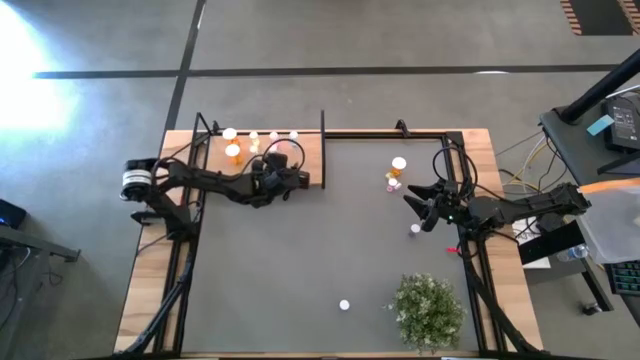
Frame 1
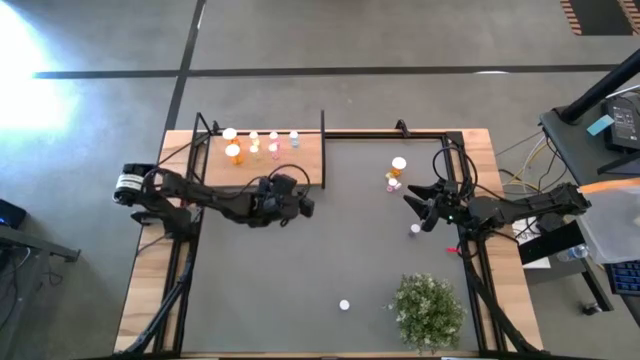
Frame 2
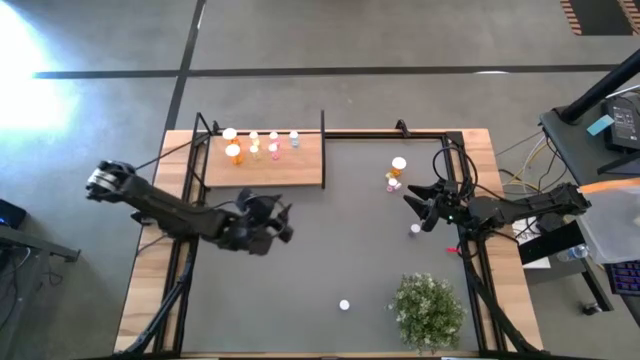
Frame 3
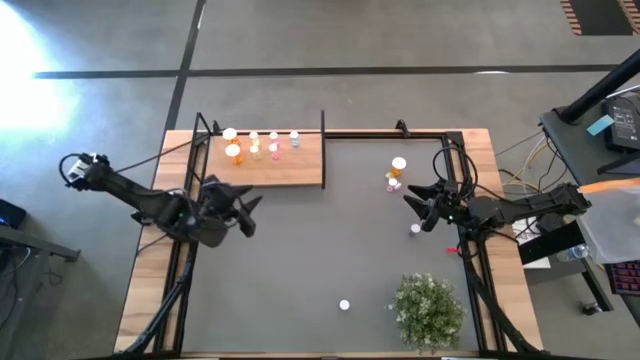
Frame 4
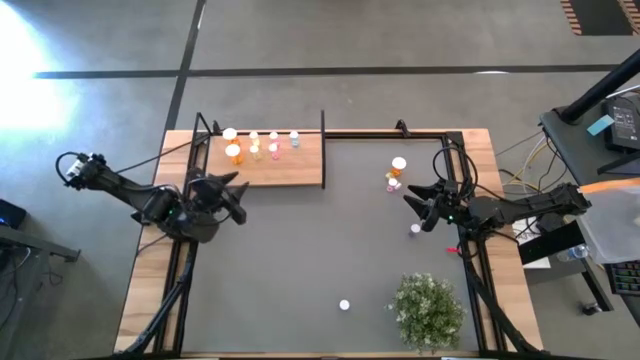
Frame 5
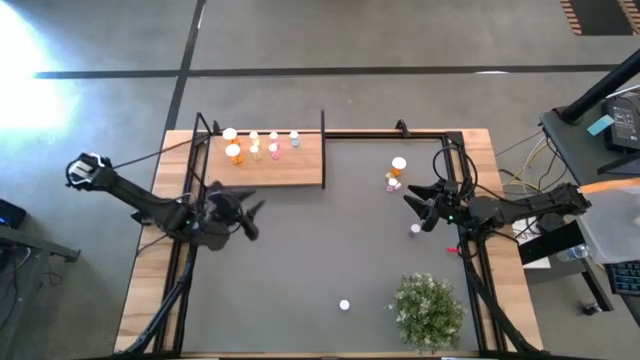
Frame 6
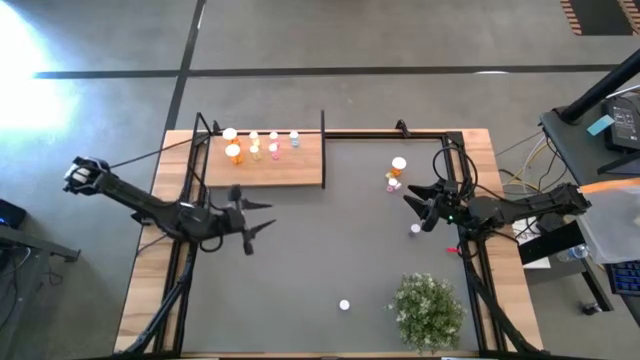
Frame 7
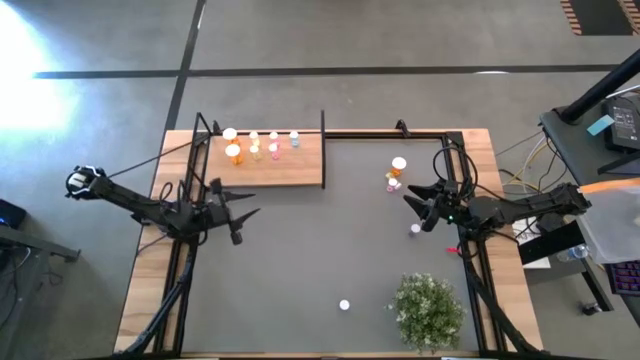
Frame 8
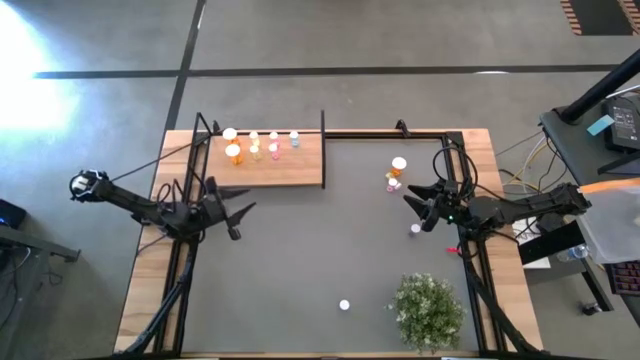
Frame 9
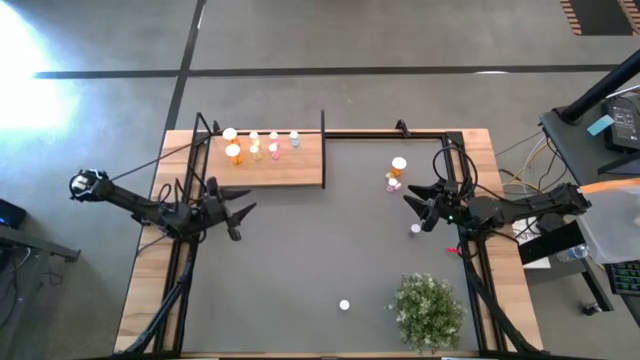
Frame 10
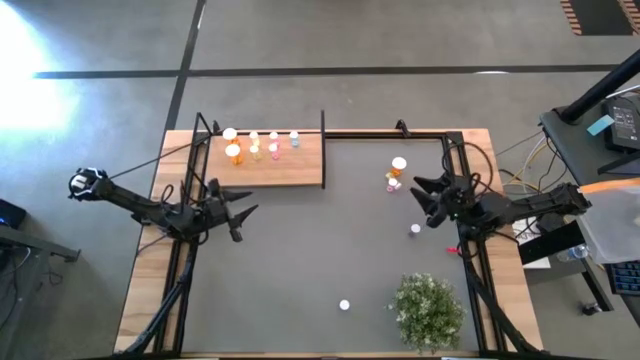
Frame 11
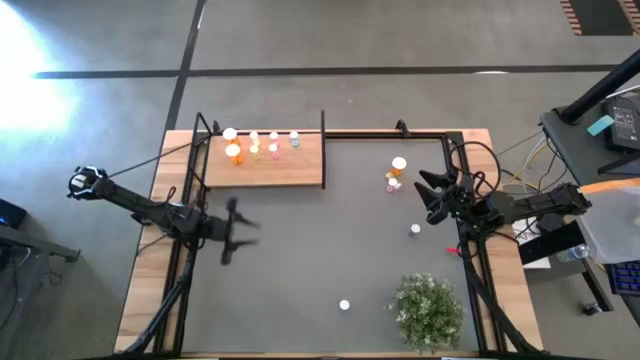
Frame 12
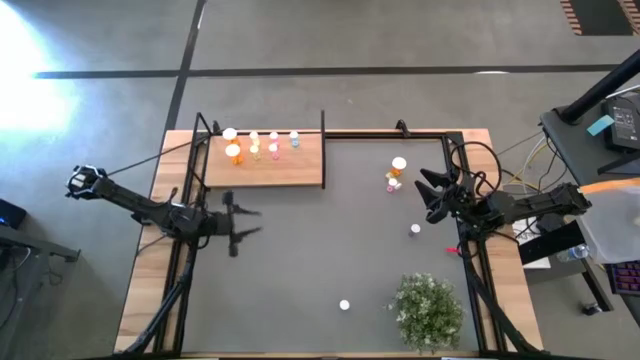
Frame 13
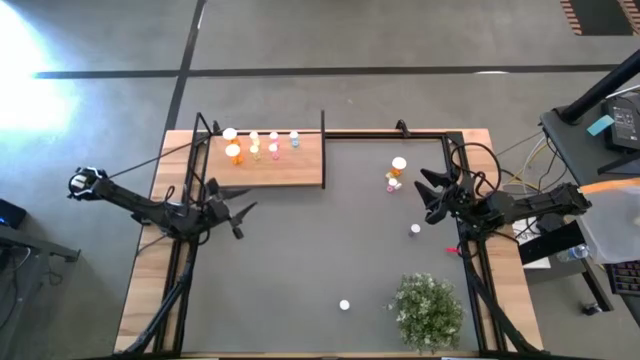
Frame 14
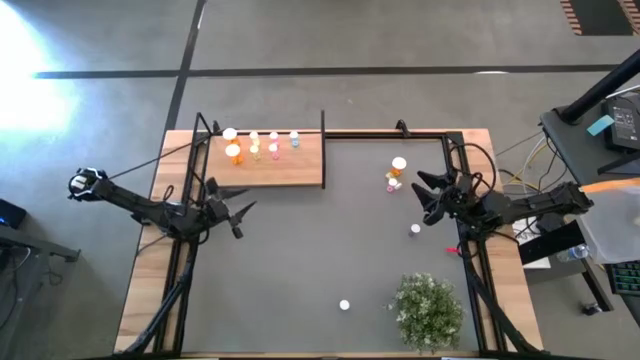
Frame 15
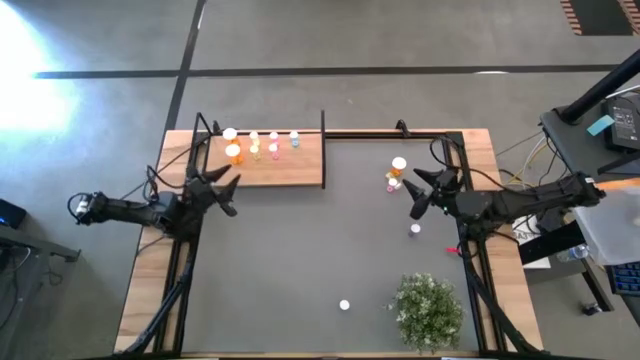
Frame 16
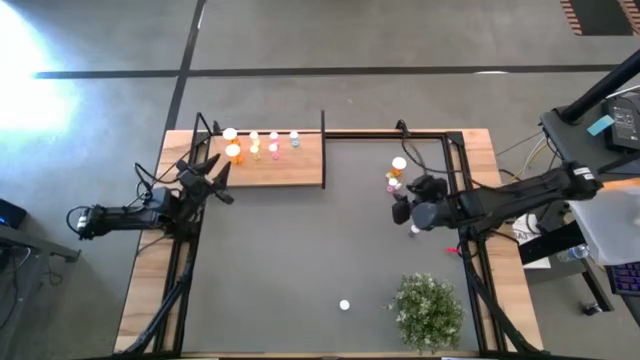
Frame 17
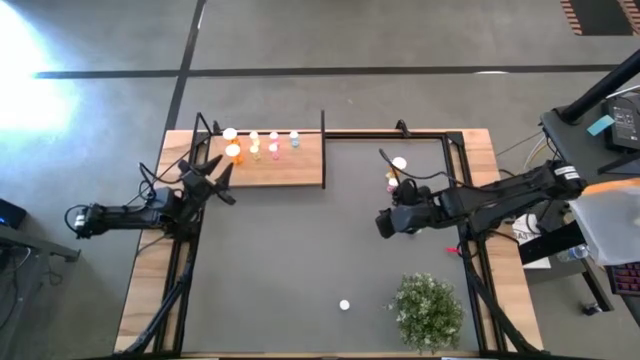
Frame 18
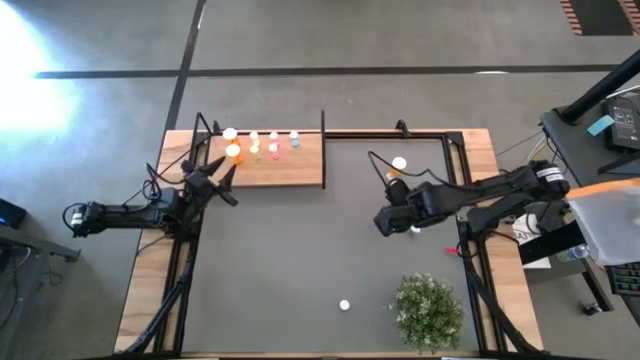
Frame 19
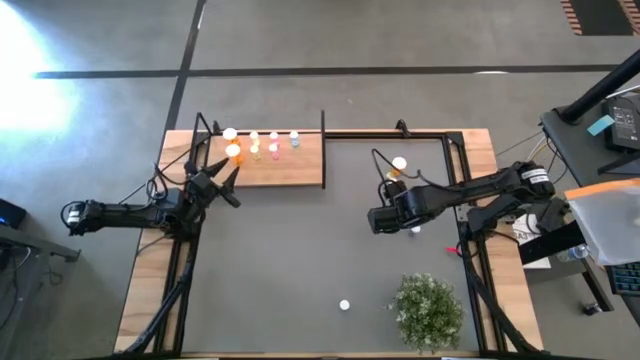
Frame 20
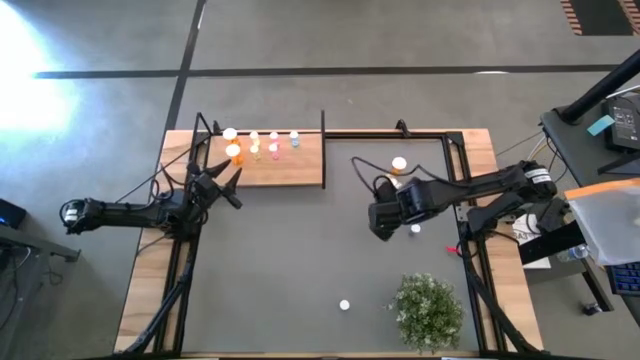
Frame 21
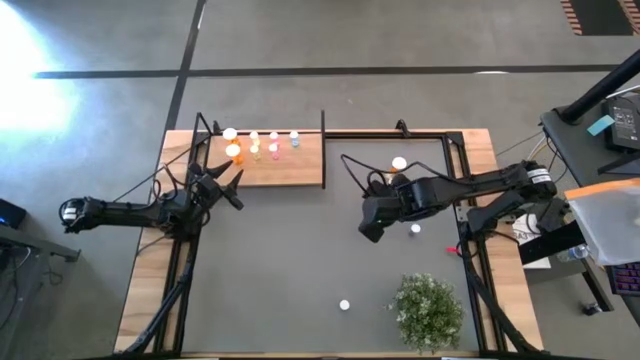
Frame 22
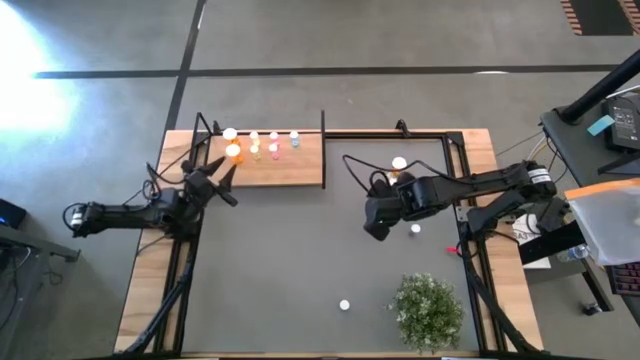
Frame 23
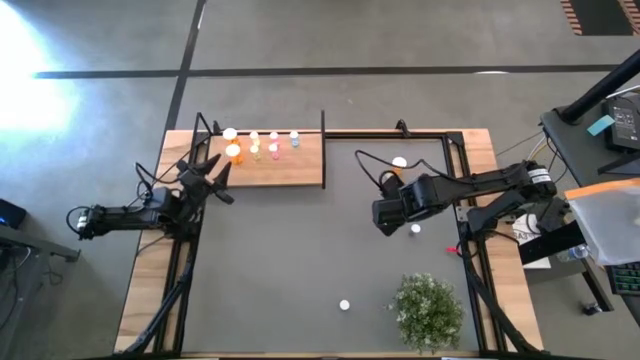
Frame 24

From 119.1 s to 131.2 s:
Task: Pick and place medicine bottles onto shelf by color
Move the top blue pill bottle to the middle of the table

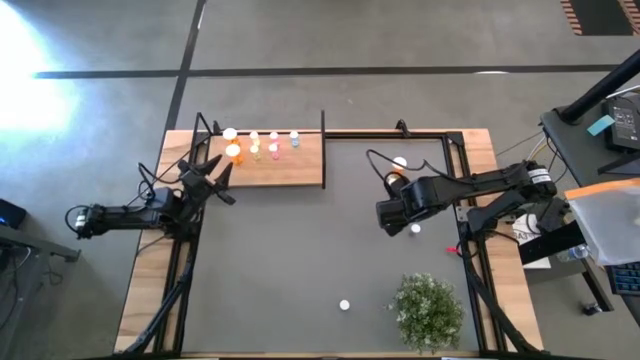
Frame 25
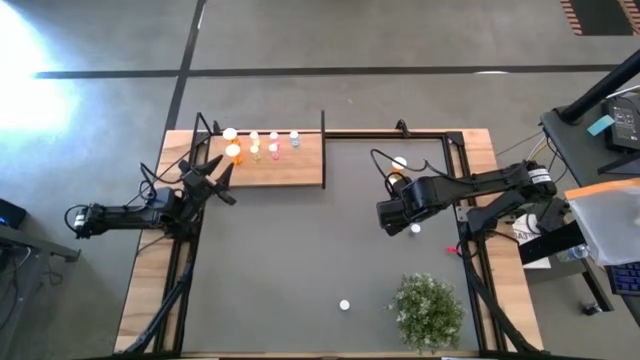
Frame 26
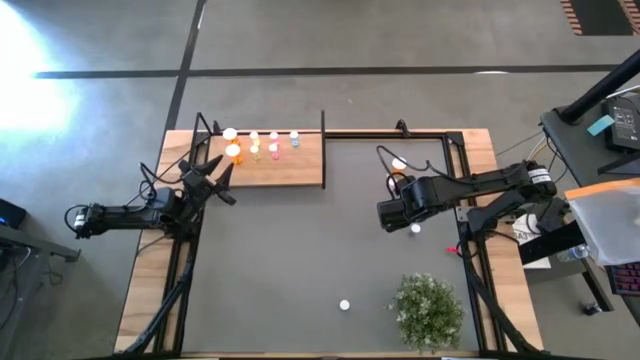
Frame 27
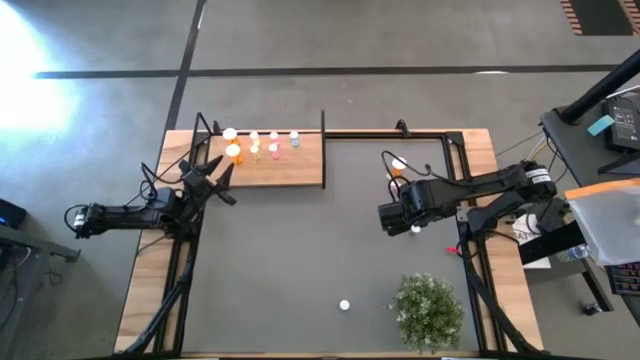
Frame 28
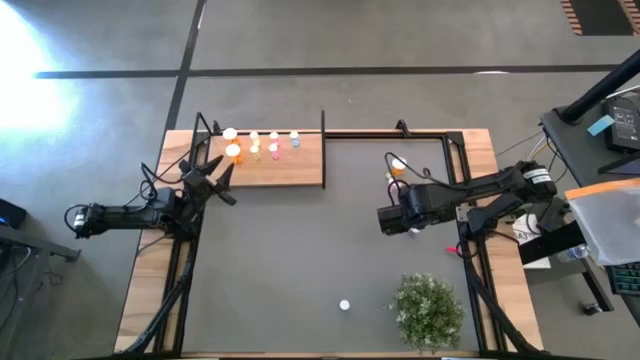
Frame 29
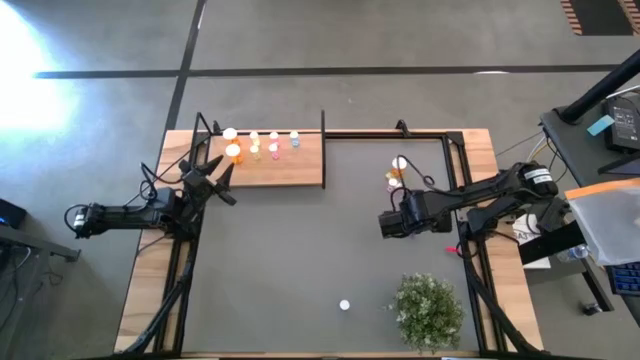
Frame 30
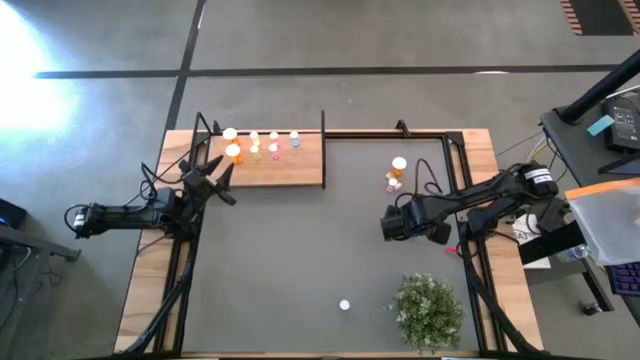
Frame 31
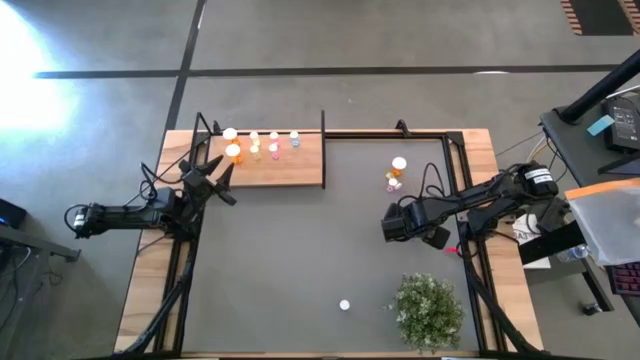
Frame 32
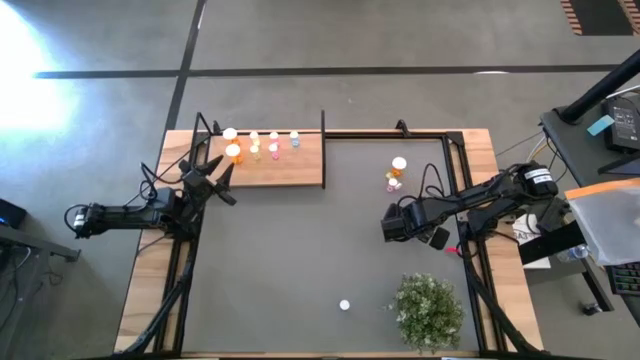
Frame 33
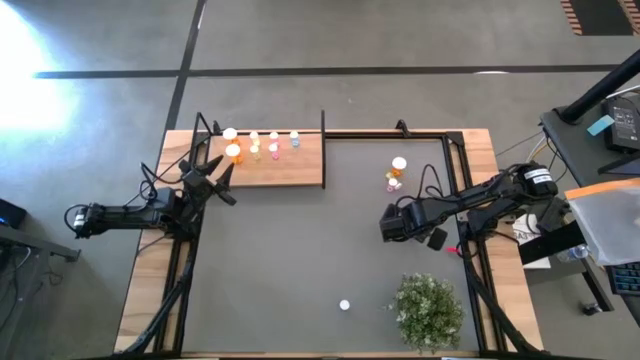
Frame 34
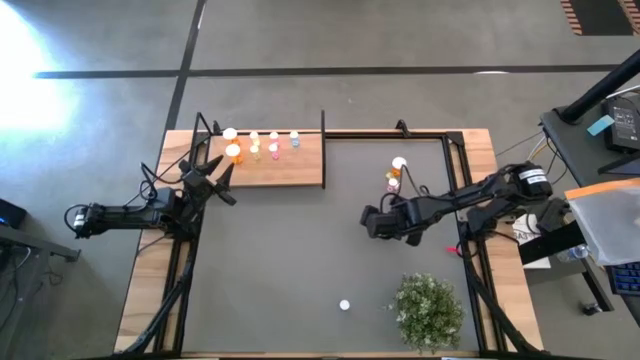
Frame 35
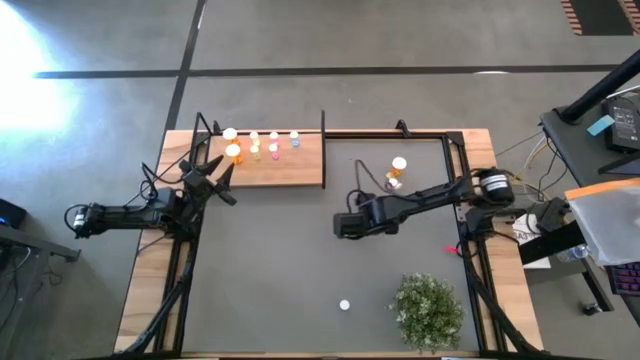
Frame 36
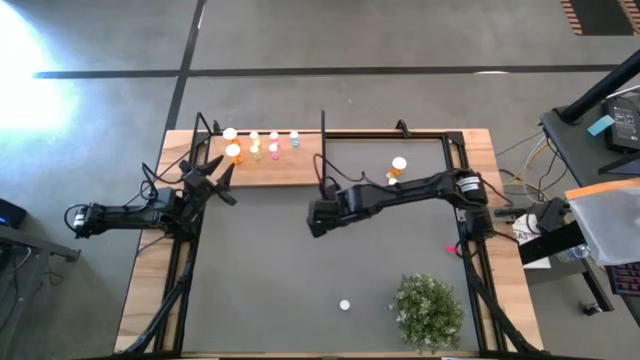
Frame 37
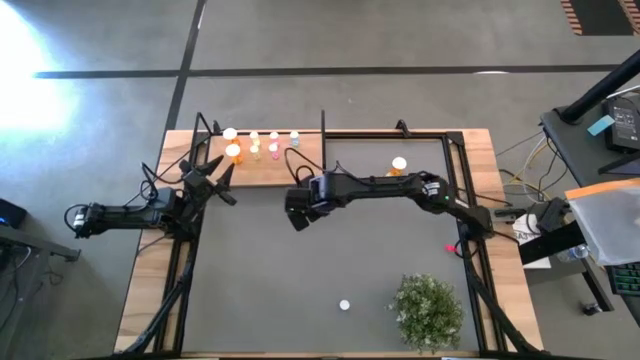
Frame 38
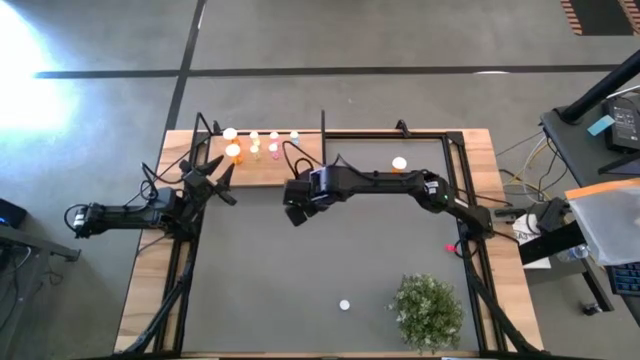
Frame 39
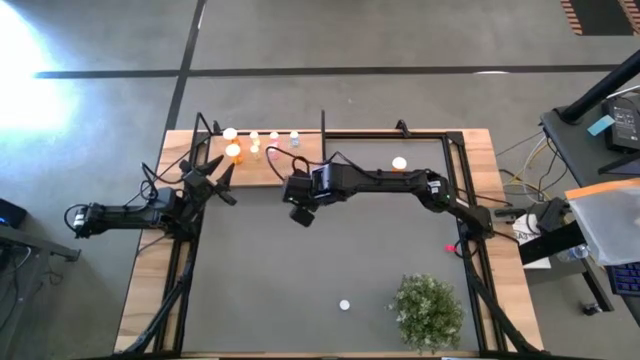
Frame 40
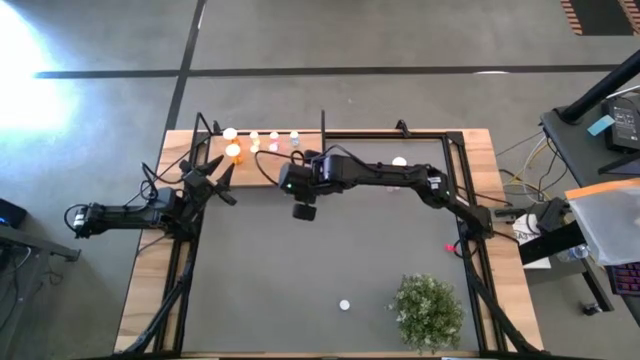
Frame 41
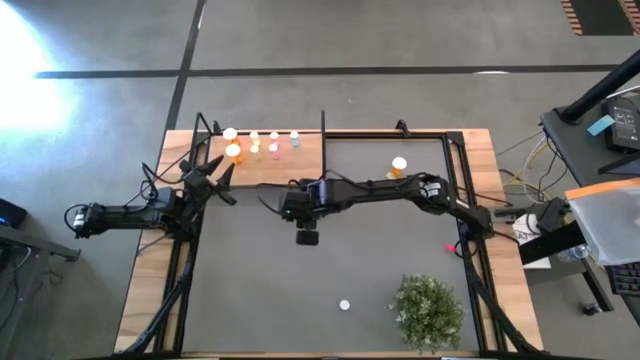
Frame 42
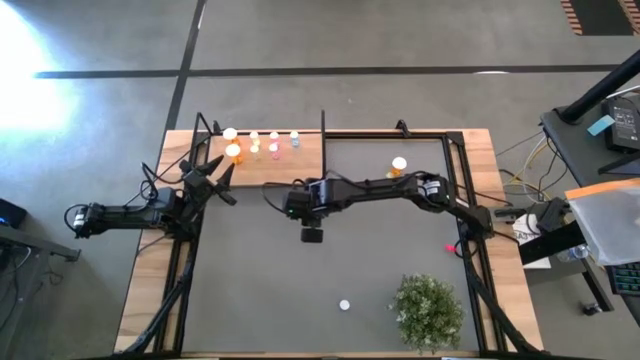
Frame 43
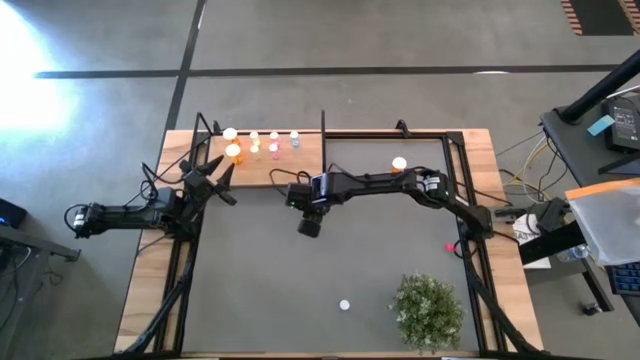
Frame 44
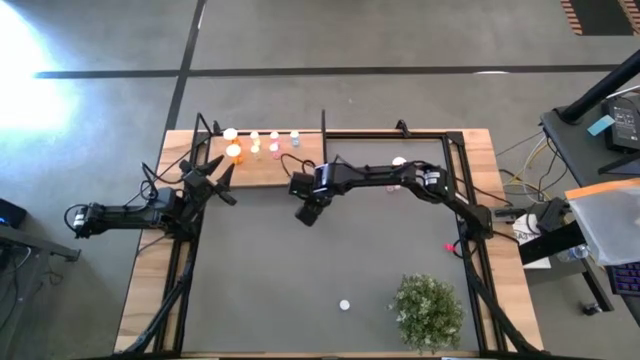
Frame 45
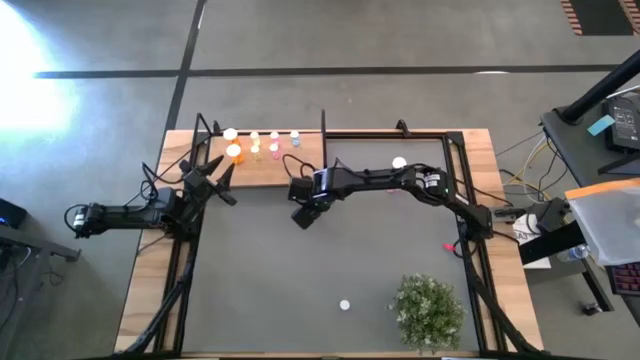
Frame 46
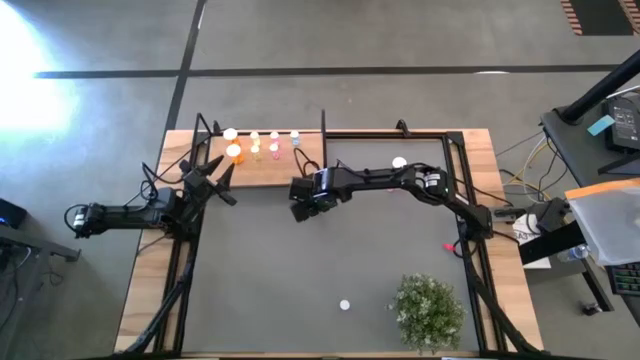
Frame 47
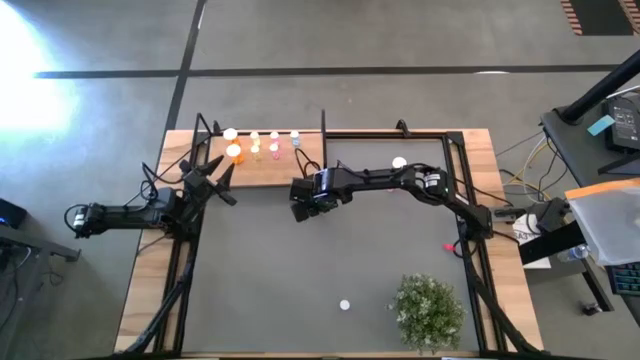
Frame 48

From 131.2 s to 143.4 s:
Move the top blue pill bottle to the middle of the table
